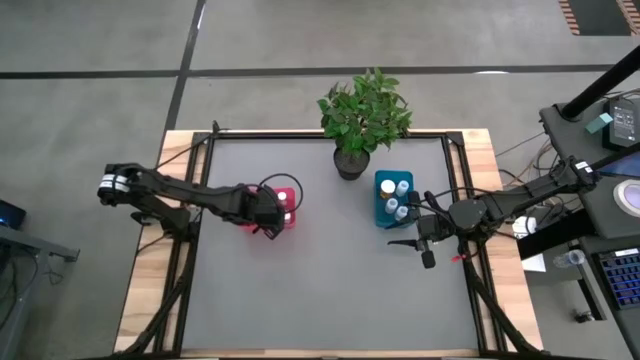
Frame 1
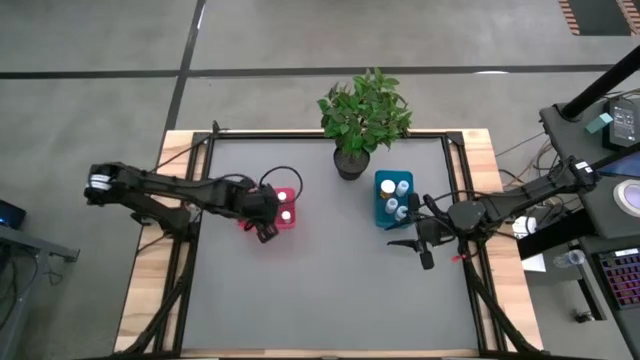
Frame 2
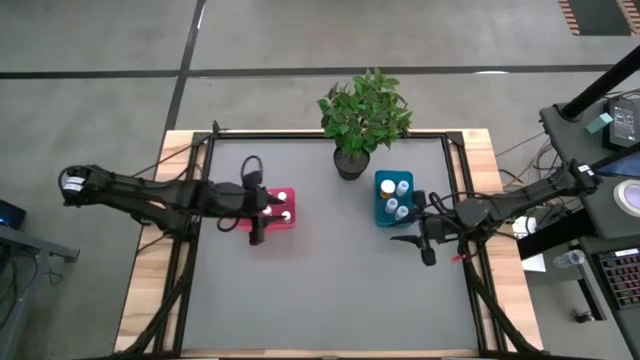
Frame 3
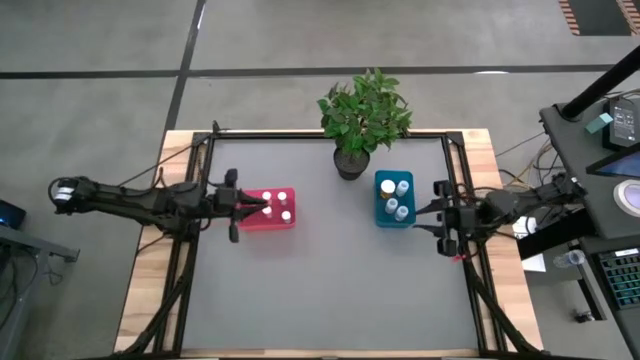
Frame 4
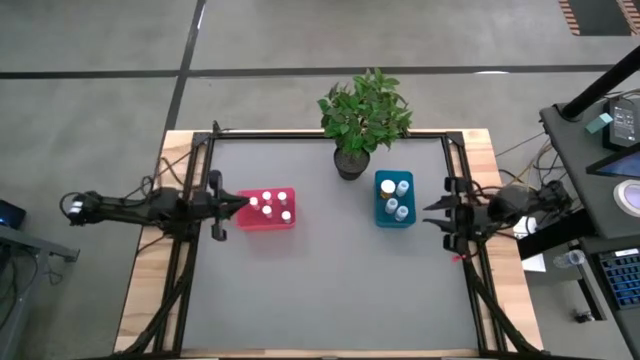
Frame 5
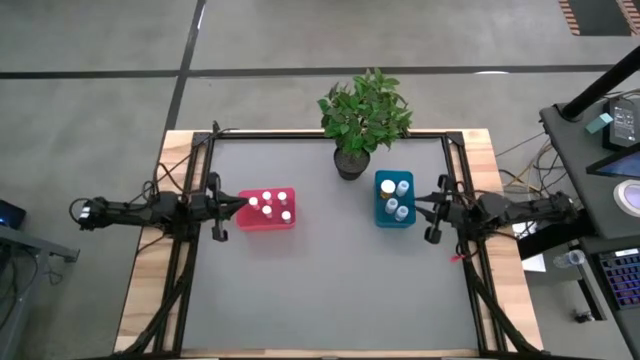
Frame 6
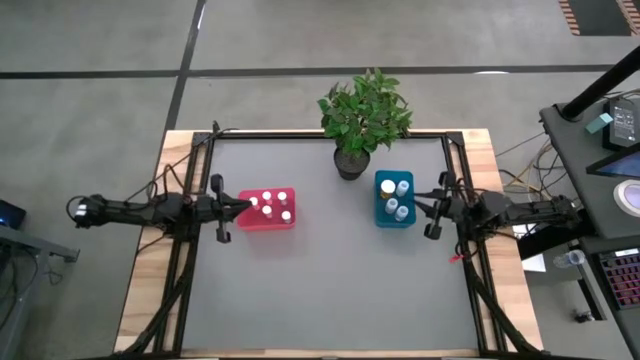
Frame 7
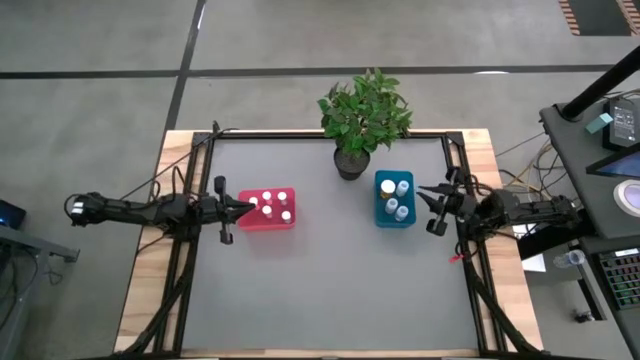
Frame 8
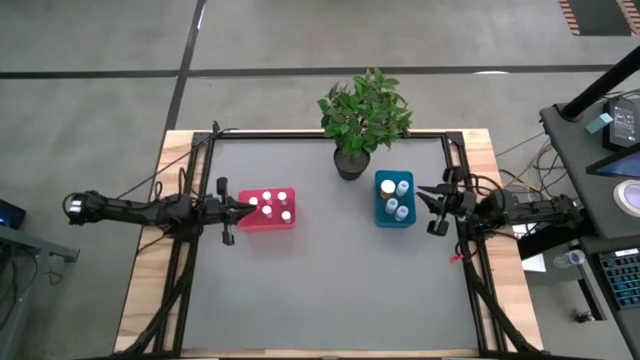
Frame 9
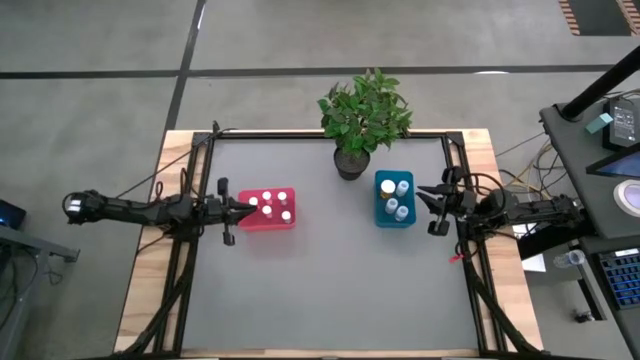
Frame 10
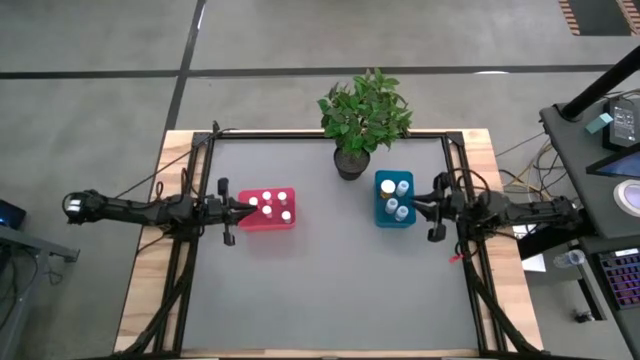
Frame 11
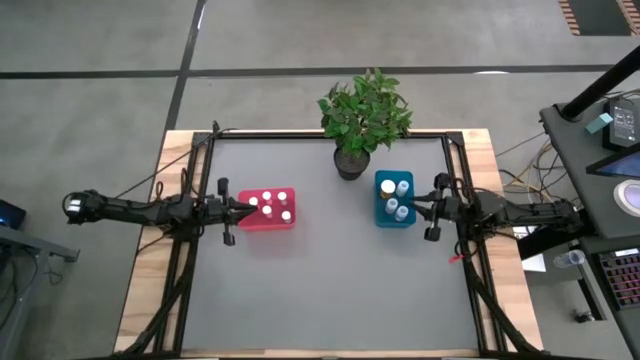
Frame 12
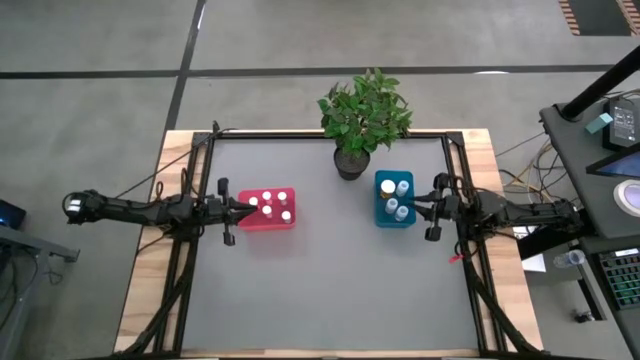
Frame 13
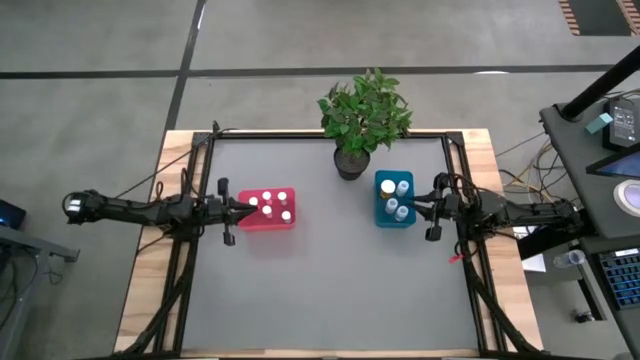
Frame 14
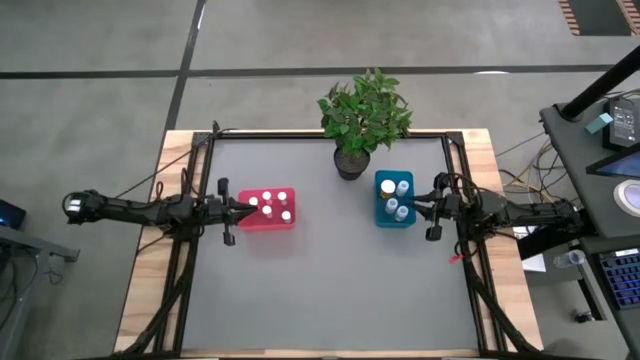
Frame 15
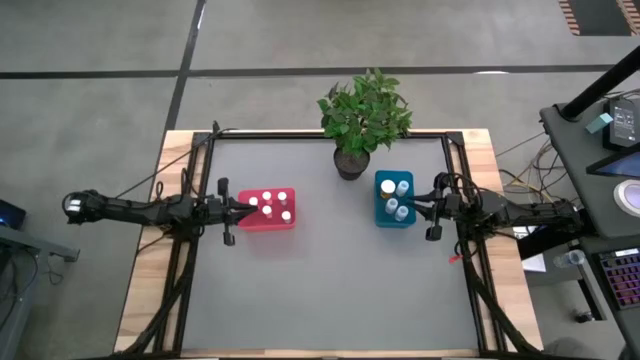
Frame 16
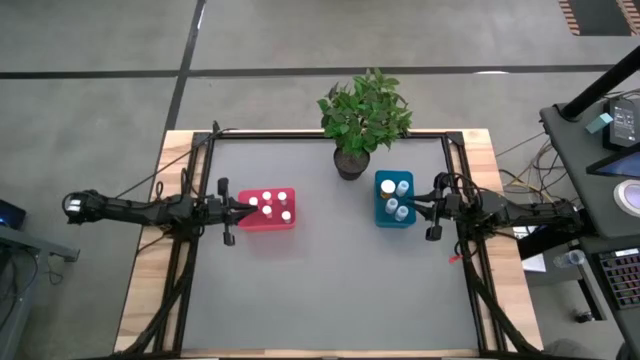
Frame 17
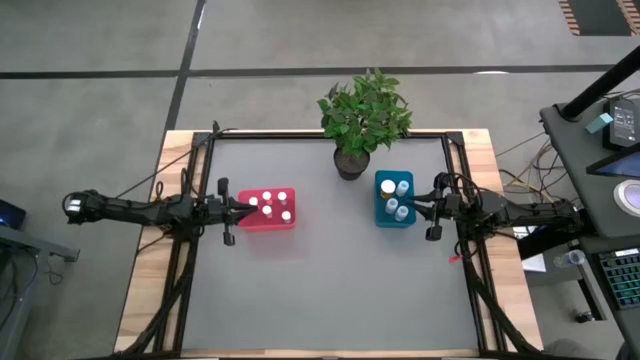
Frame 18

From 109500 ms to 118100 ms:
Task: Pick and place medicine bottles into bin by pill shape (circle, oval)
Return to Home Position

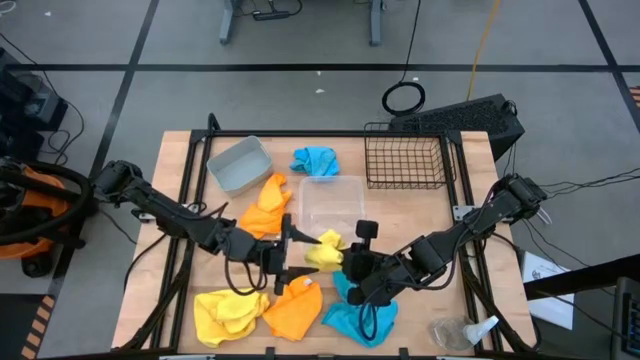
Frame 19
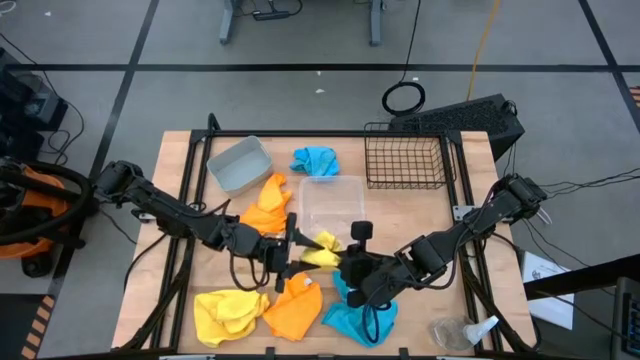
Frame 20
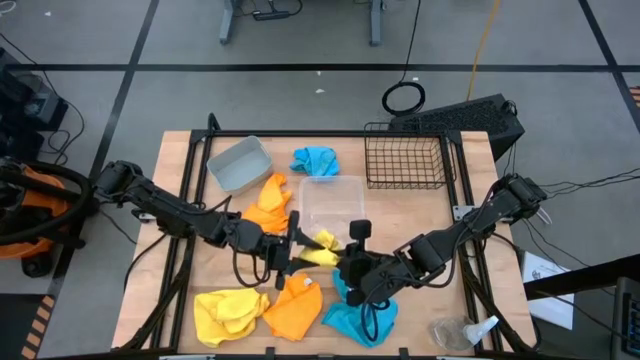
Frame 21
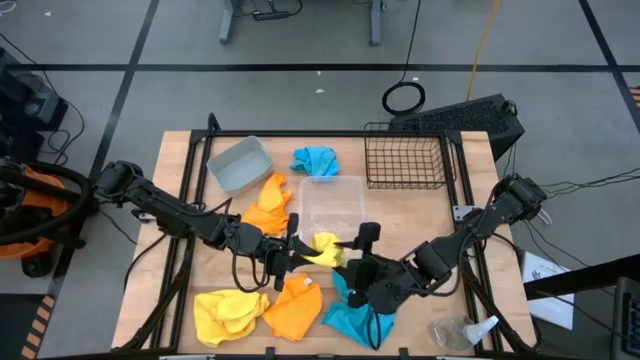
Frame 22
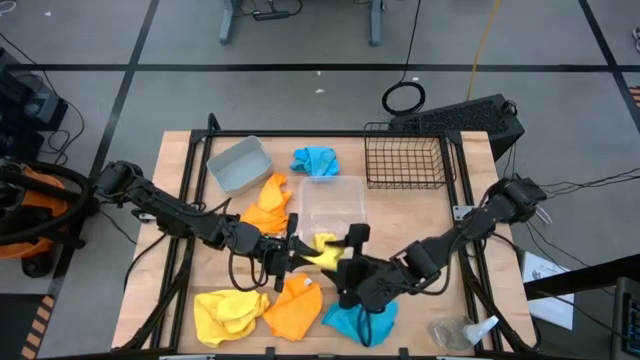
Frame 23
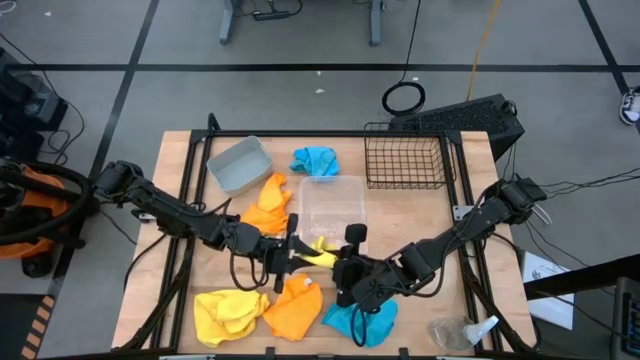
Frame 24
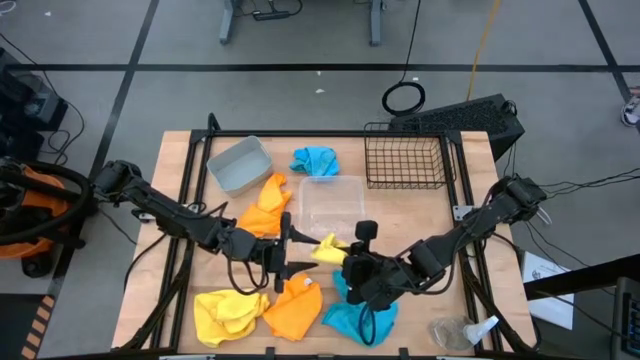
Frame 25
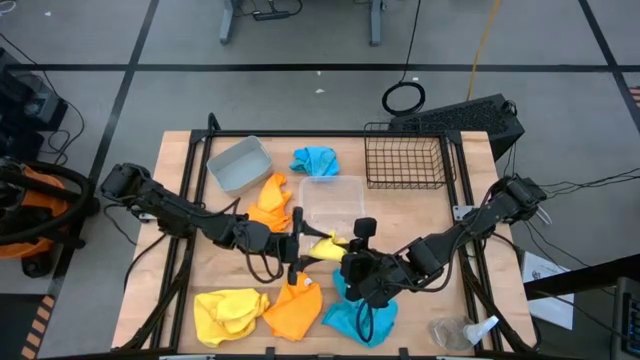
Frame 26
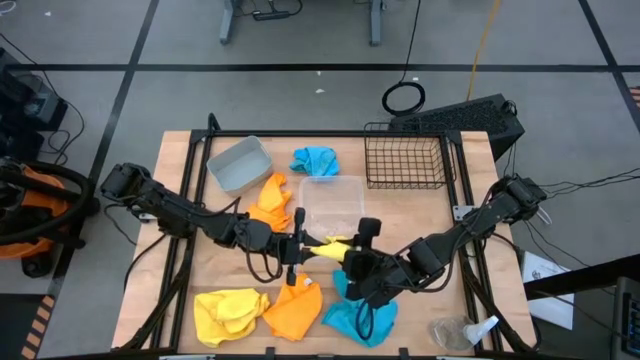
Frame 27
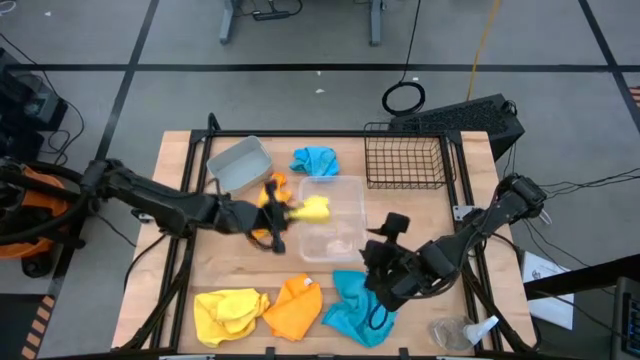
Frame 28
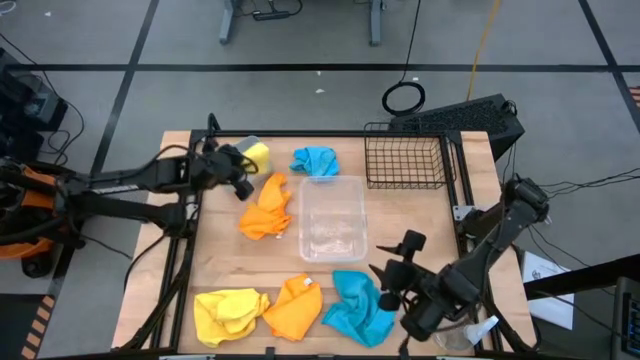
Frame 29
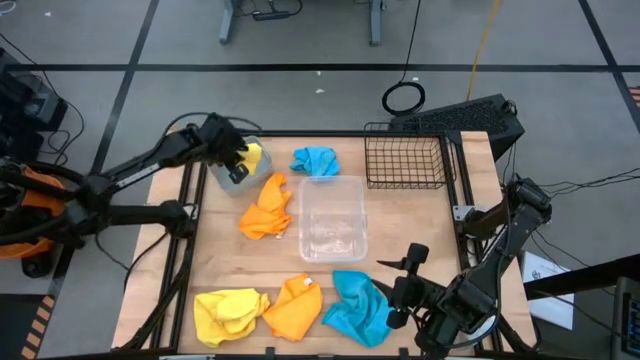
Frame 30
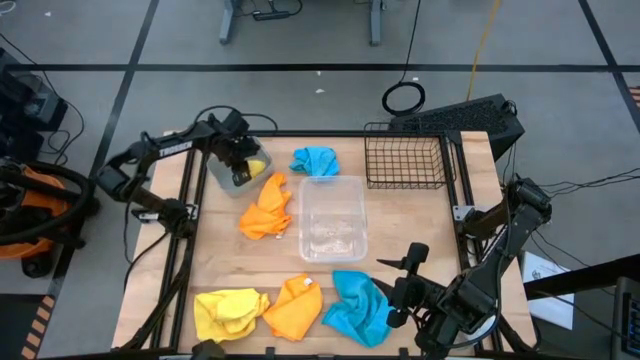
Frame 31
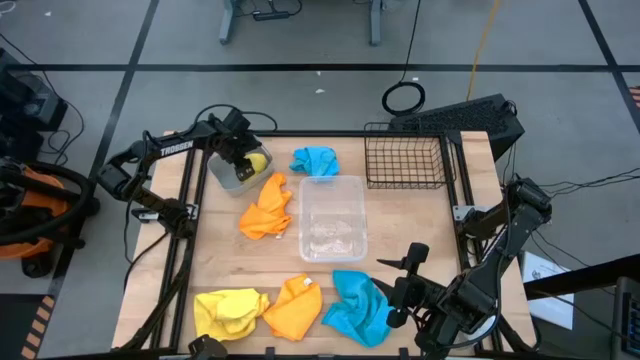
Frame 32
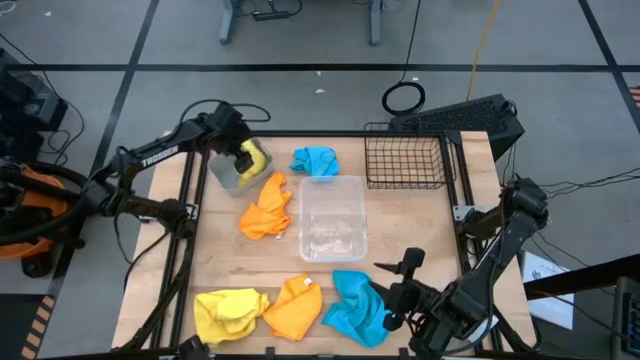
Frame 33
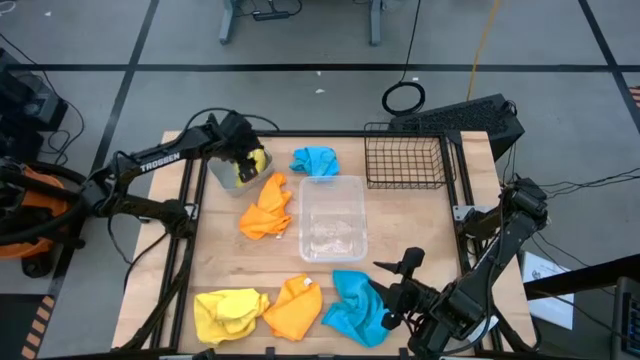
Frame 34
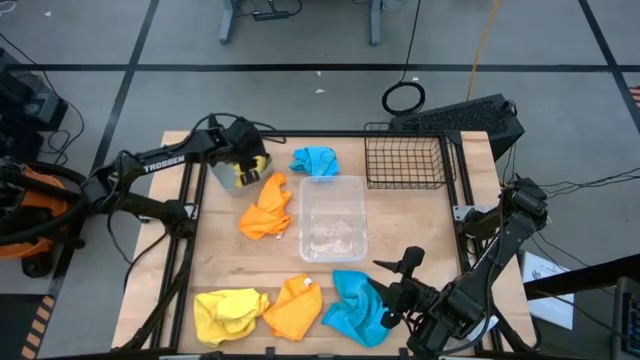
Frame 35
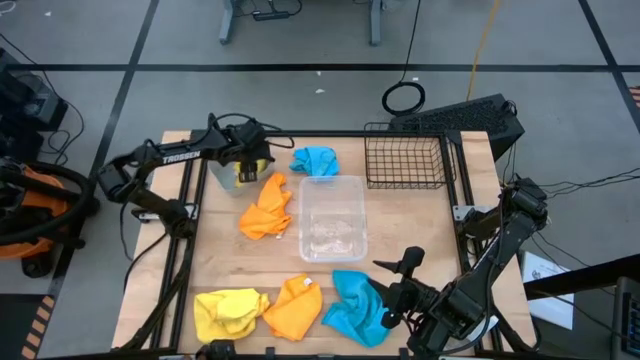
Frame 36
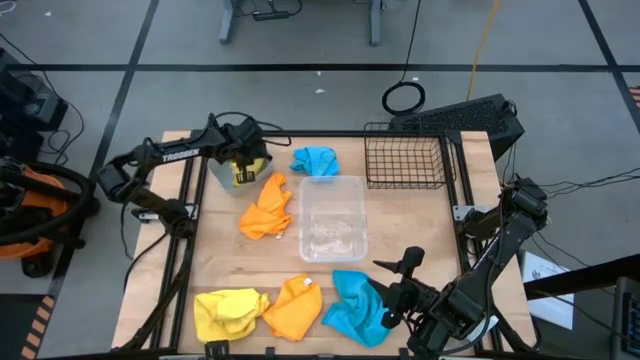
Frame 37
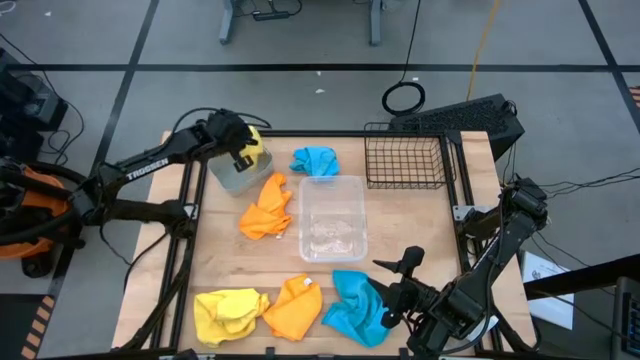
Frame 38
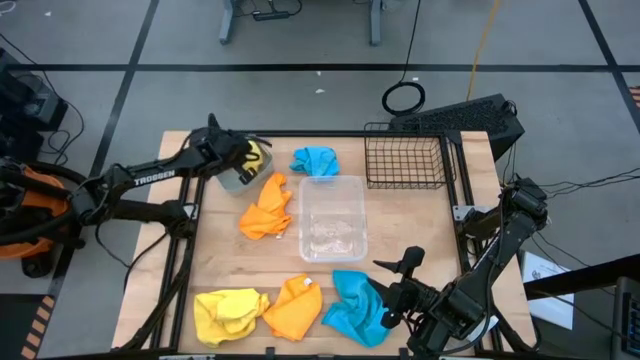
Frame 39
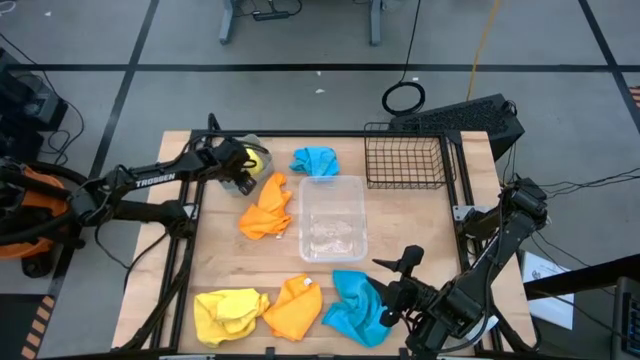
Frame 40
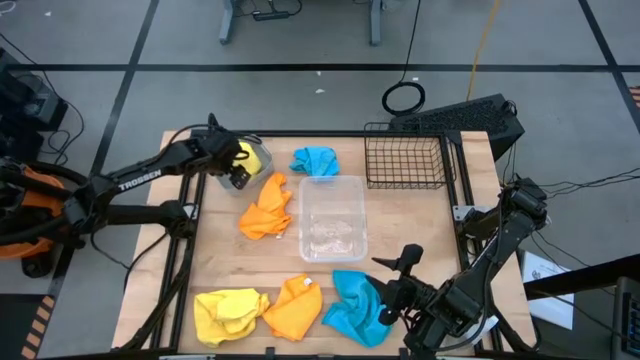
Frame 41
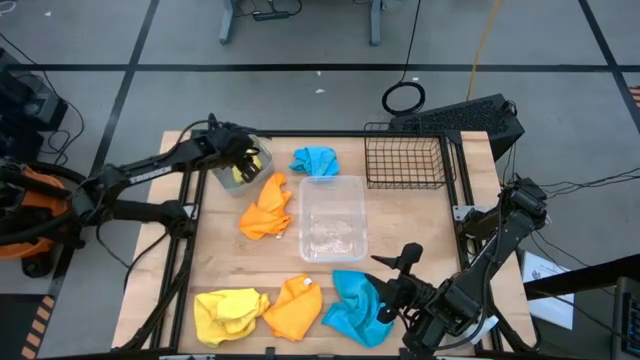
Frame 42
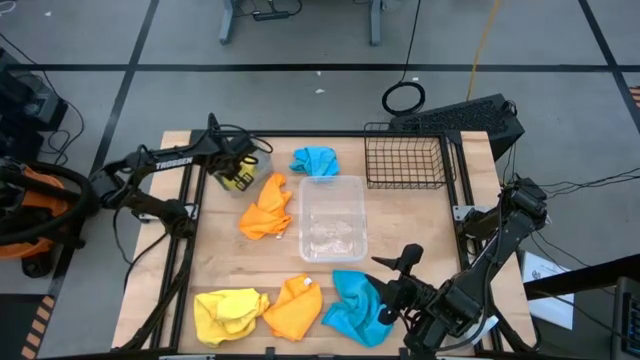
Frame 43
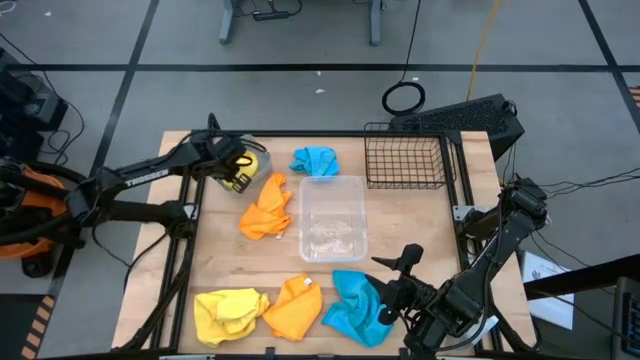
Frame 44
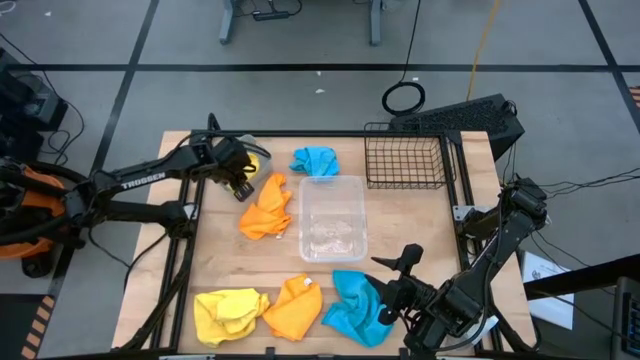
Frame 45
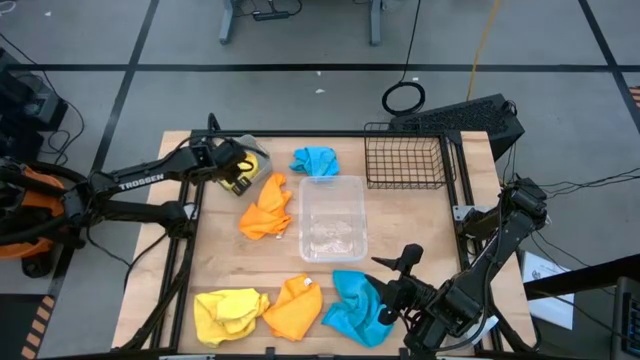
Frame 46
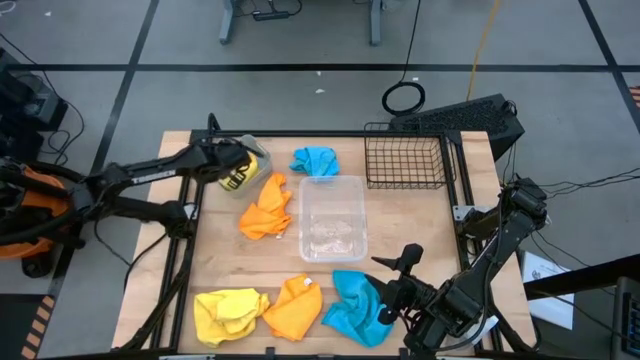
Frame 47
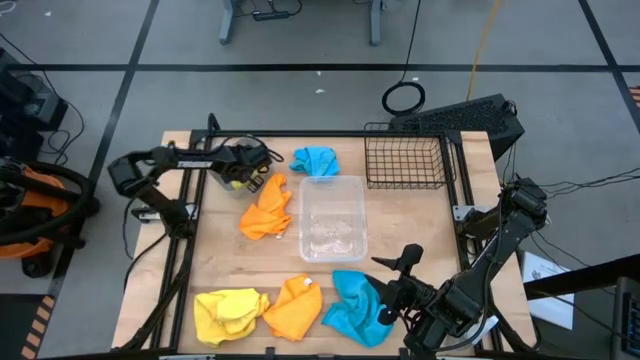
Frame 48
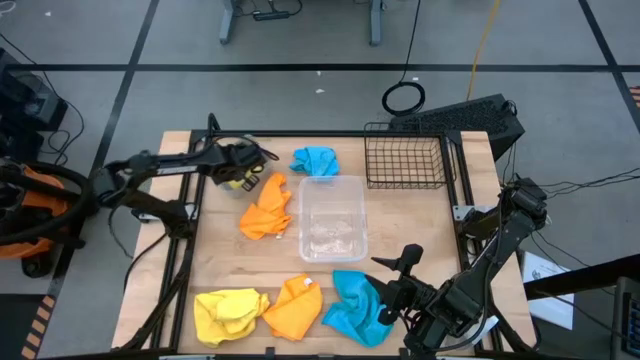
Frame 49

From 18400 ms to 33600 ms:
Task: Sort microfiber towel by color & place in baskets
Put the right yellow towel into the gray bin
